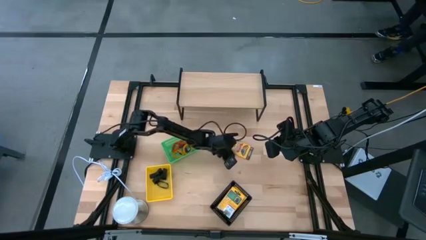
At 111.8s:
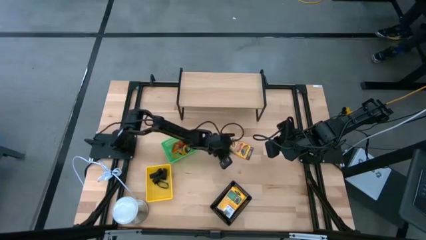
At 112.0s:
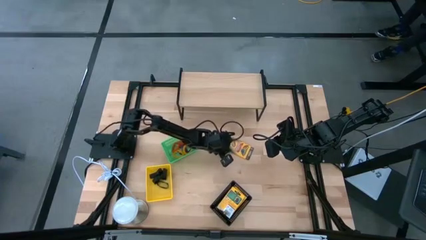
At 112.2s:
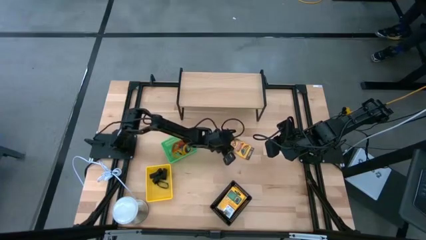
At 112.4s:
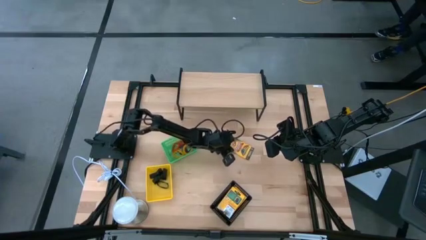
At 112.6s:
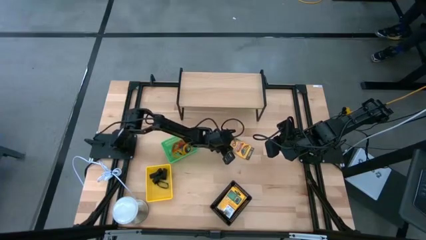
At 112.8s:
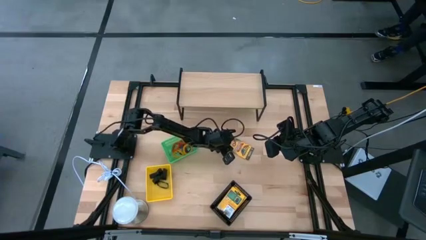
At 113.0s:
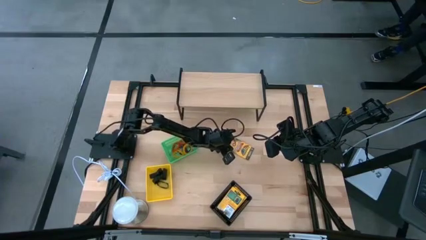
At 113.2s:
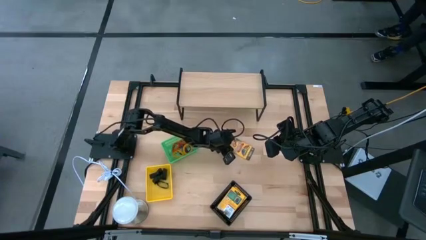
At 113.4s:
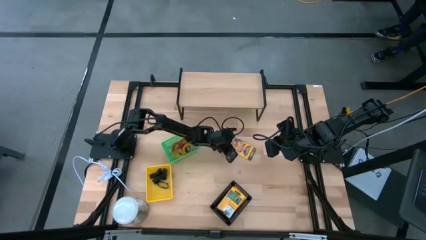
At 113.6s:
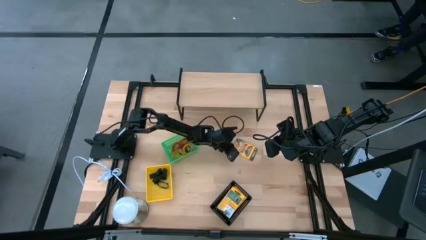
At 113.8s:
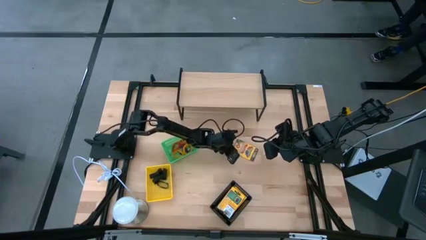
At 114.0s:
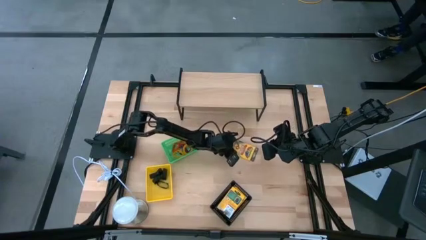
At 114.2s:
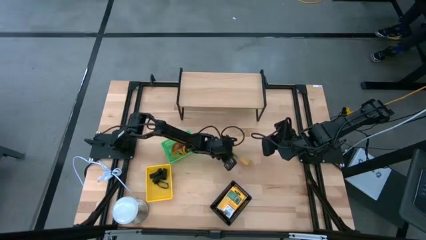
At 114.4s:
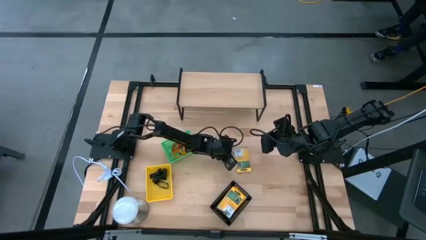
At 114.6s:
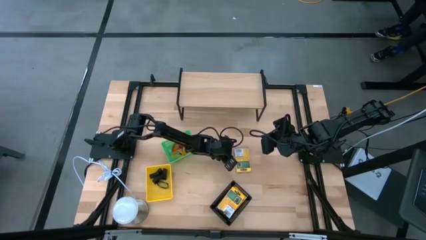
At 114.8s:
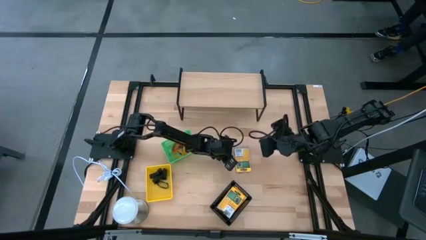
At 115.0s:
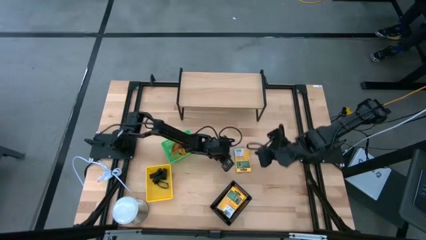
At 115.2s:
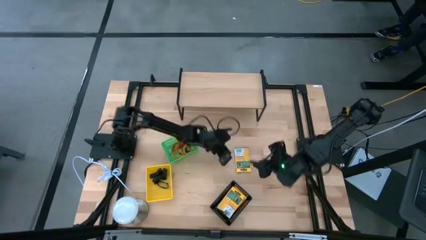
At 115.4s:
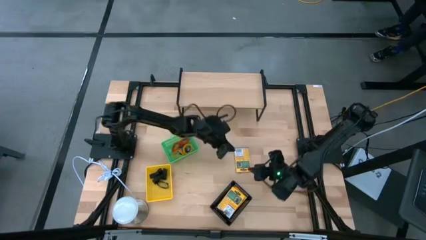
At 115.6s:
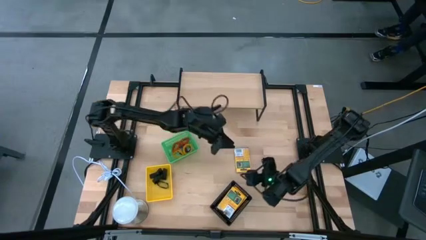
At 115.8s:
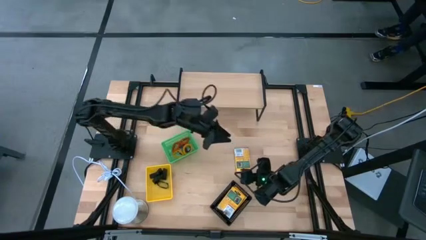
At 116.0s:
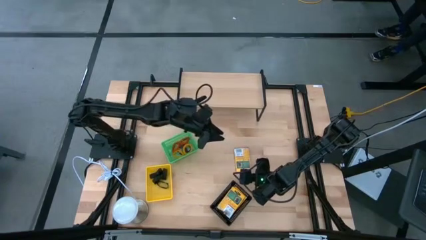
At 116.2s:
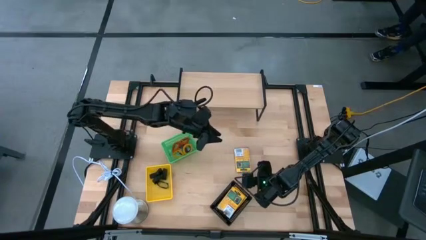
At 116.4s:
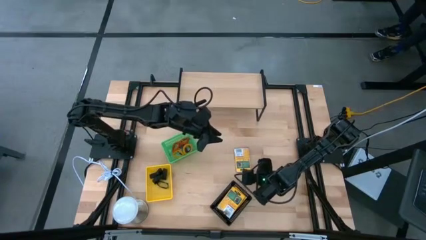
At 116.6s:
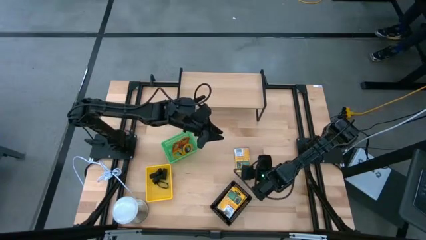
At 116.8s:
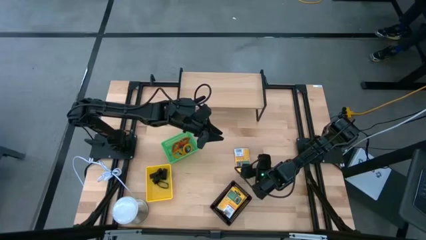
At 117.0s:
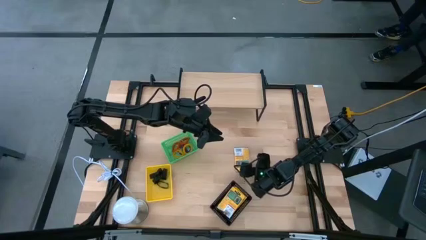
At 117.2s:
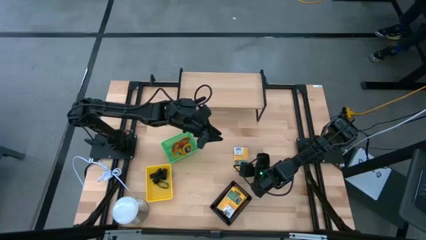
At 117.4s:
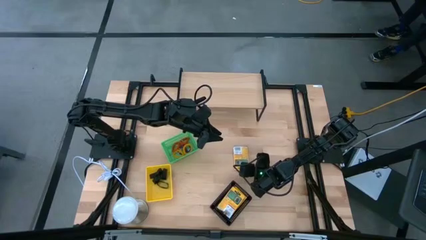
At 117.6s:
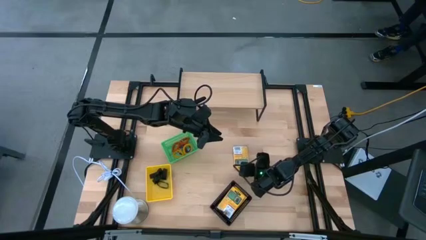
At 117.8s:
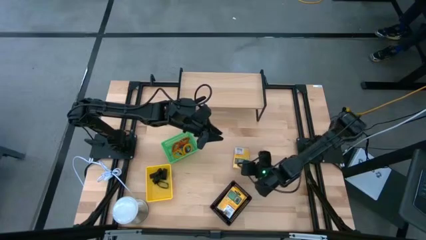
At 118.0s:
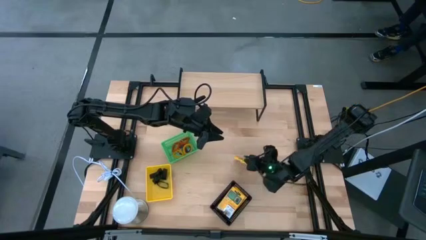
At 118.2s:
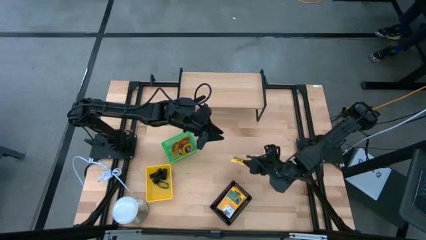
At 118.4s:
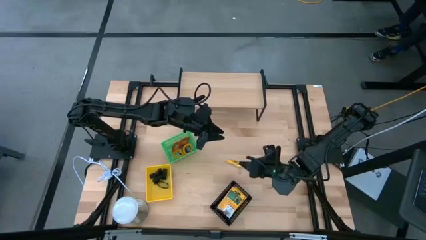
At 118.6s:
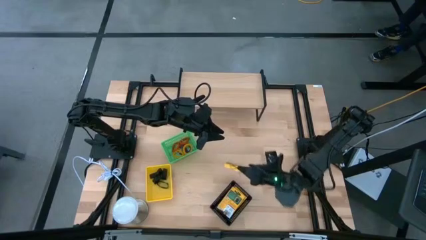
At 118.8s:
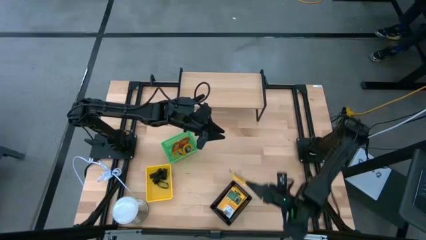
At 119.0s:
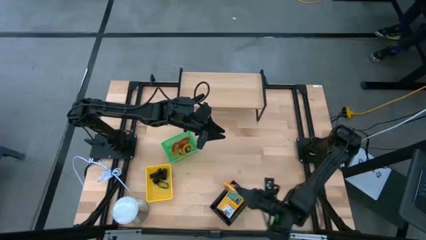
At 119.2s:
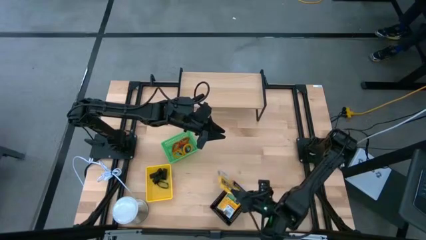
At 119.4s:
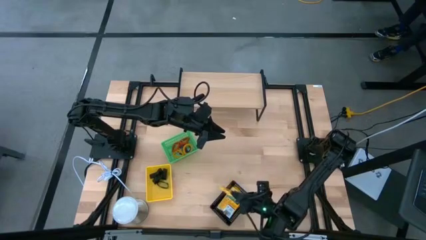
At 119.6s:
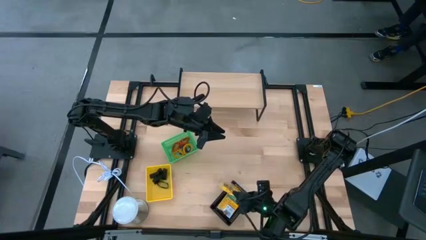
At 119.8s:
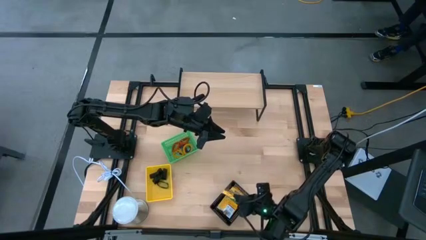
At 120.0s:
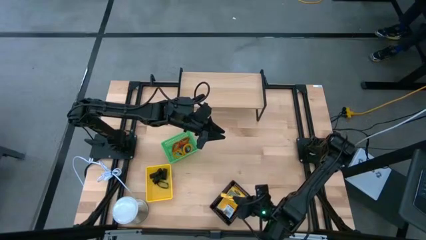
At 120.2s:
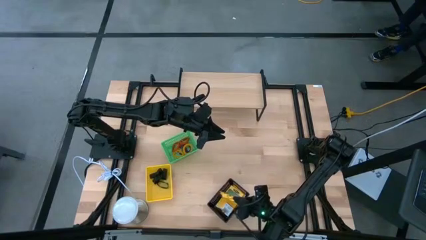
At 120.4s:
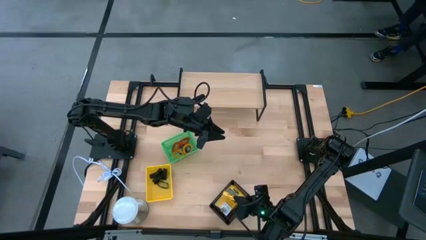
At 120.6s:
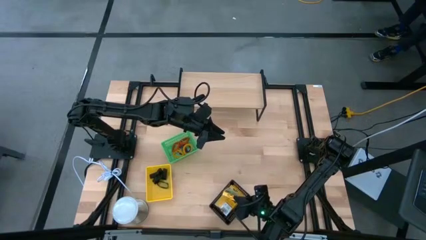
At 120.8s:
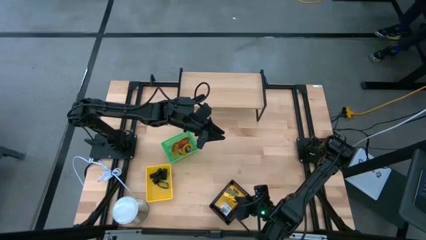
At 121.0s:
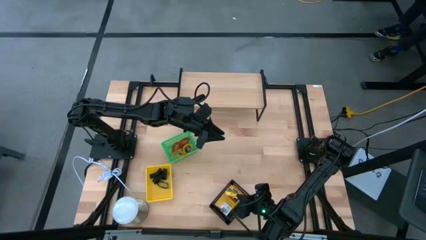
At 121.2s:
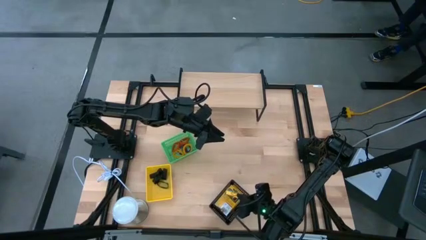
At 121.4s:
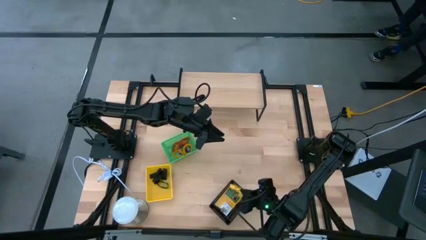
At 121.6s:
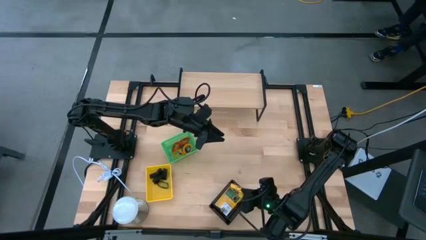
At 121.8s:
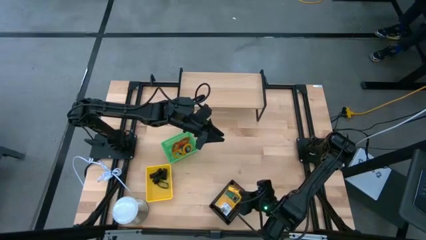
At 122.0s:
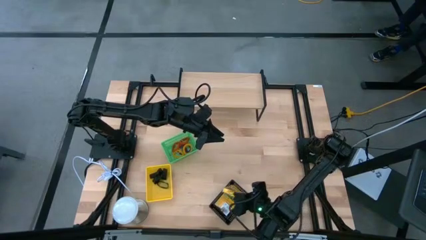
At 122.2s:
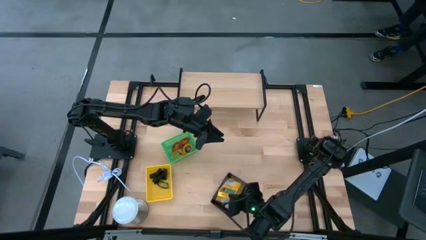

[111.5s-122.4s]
Task: Pick & Place Office Desk Supplies
Put the crayon box into the black basket

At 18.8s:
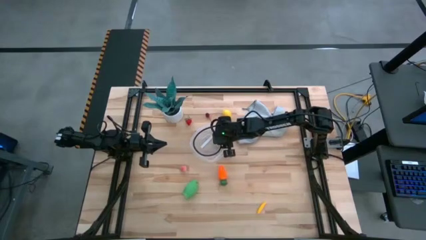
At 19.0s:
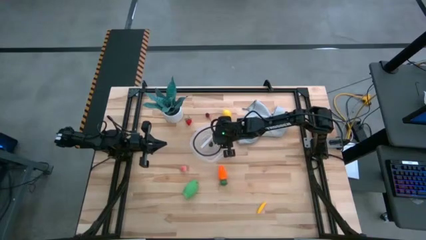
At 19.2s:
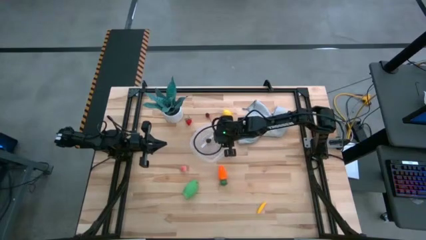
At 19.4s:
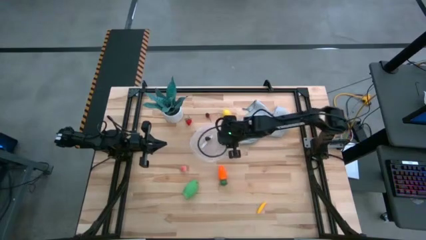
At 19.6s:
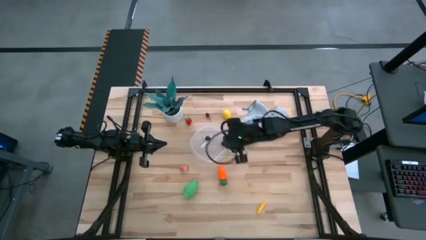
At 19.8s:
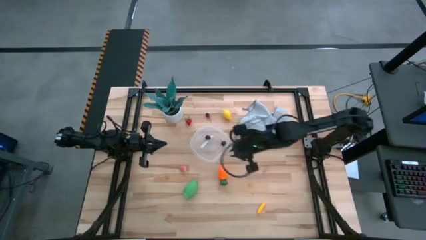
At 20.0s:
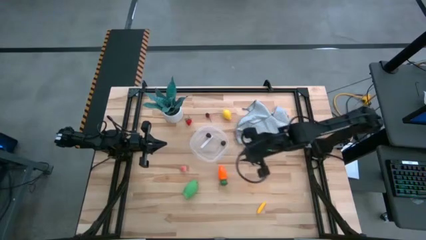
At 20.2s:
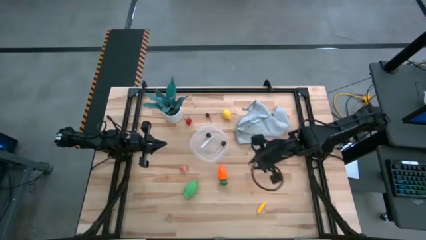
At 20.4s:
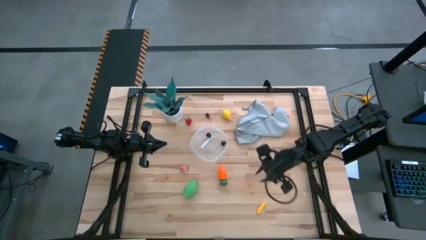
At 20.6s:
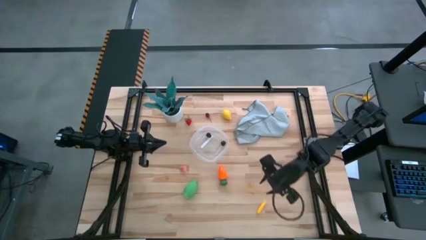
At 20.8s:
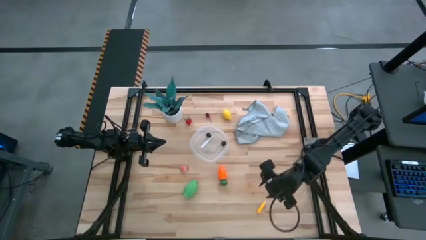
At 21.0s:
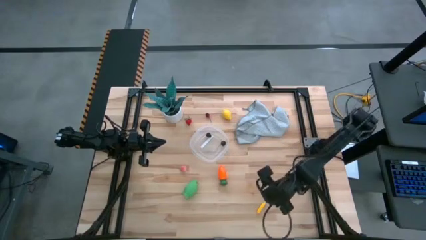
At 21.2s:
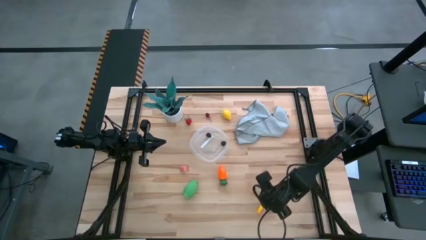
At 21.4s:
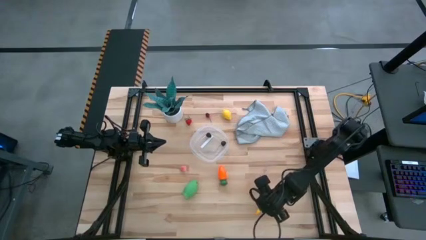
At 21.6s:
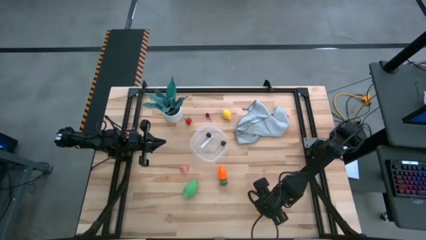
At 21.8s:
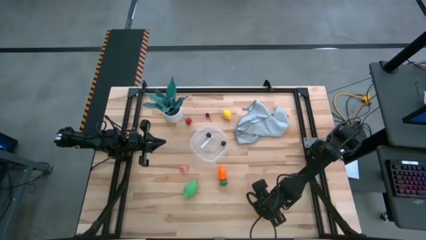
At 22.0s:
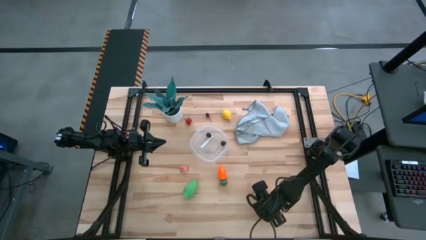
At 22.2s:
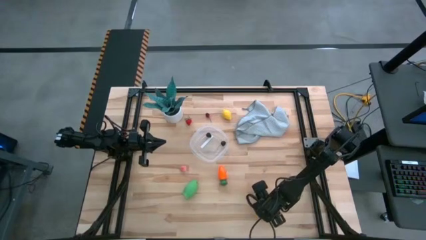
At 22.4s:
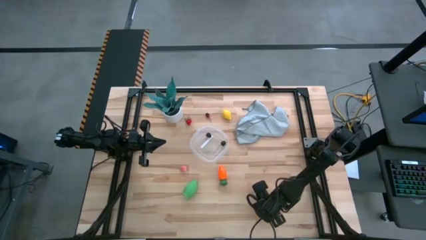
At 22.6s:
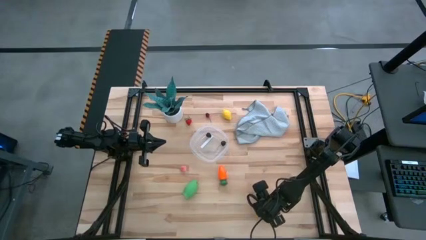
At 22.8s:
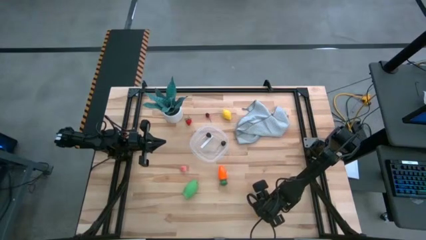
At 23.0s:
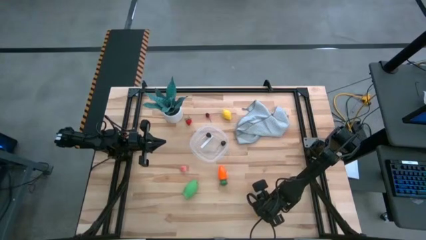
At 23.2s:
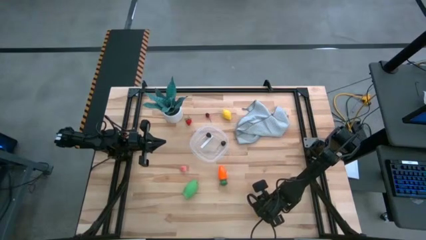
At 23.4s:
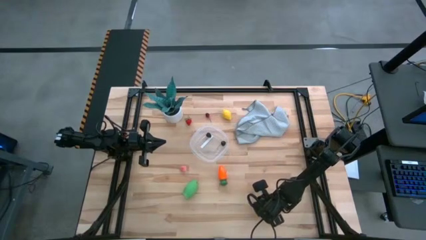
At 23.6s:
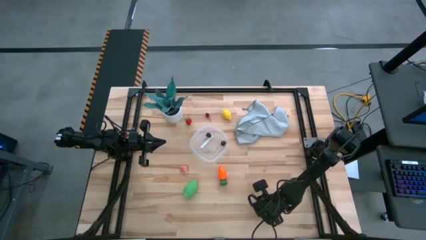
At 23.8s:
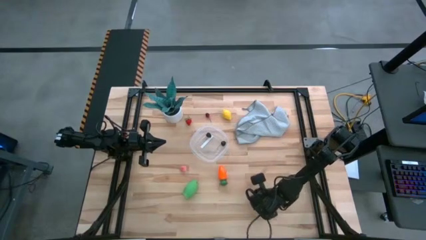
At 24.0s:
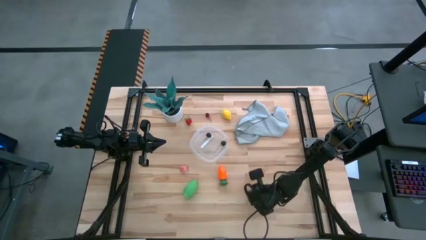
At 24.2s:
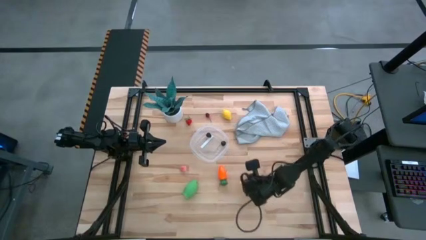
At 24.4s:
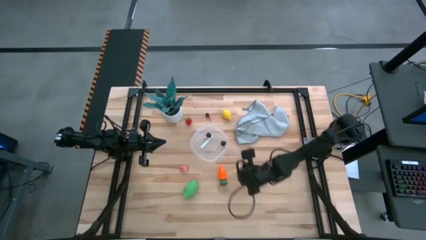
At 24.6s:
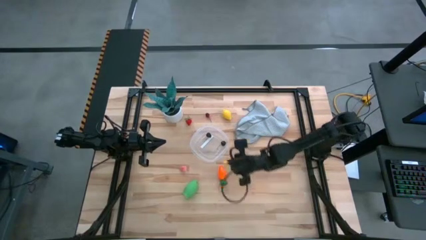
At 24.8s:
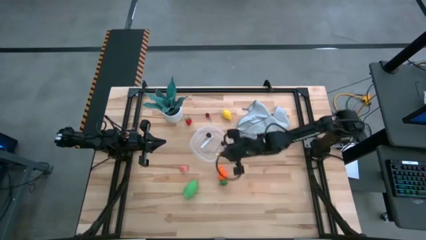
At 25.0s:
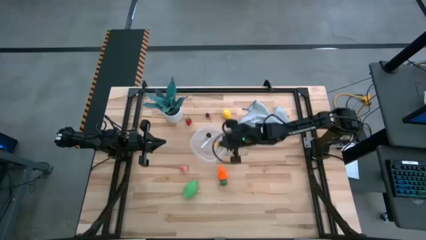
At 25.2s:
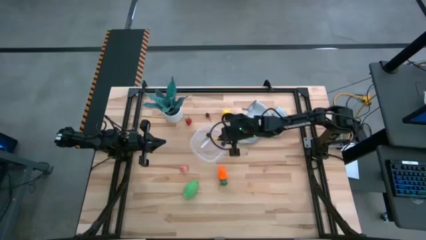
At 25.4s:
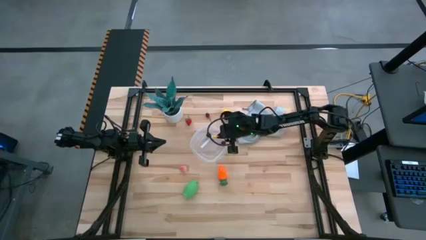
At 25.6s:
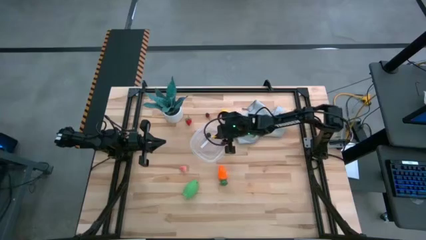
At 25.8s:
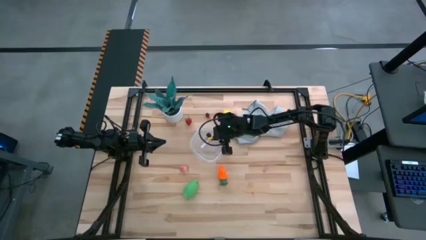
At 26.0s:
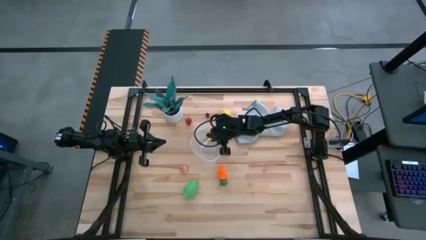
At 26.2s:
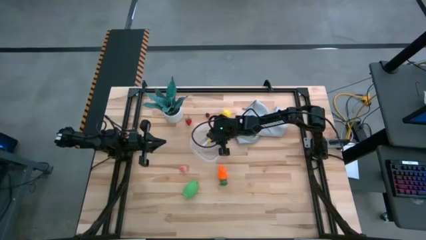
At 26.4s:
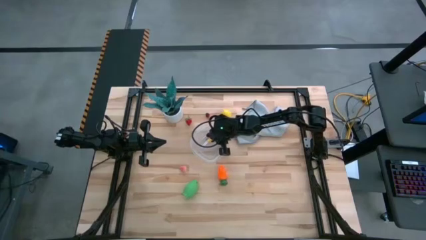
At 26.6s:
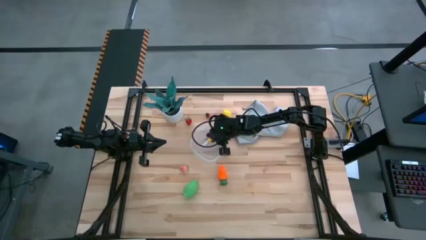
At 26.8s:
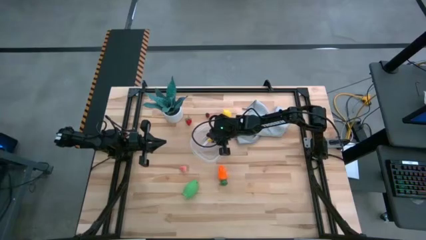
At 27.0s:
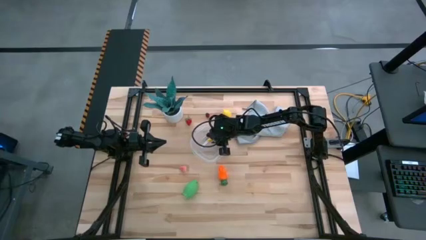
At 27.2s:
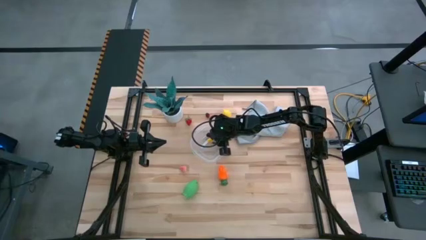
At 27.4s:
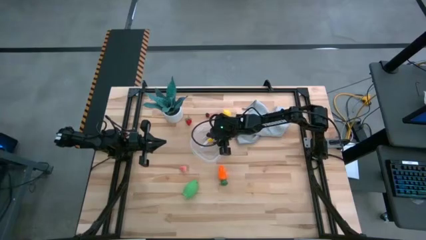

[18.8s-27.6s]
Task: Pick and placing Produce into tupperware
Put the yellow corn into the transparent bin
